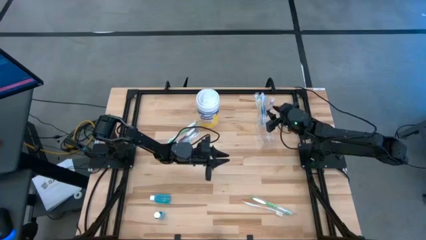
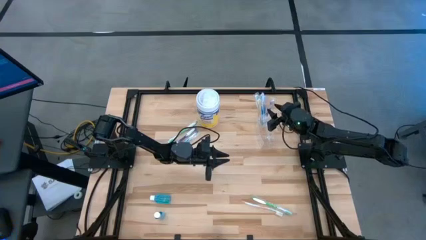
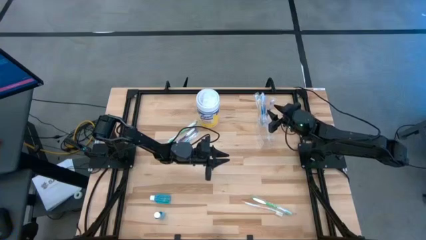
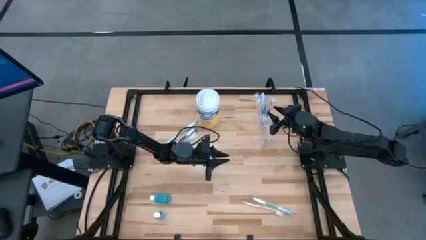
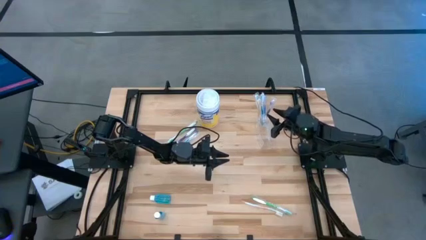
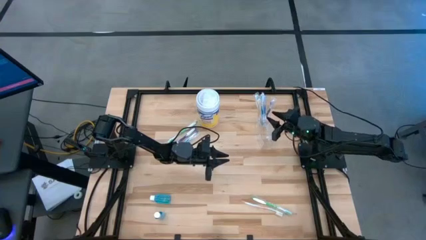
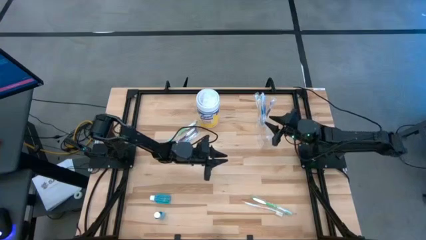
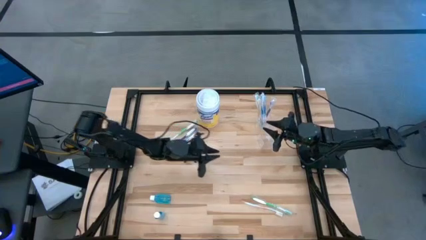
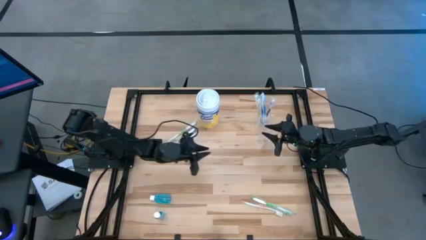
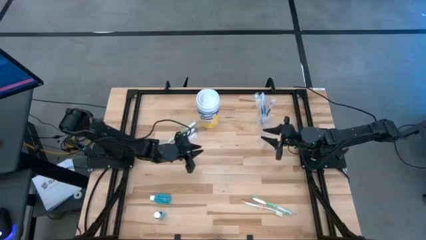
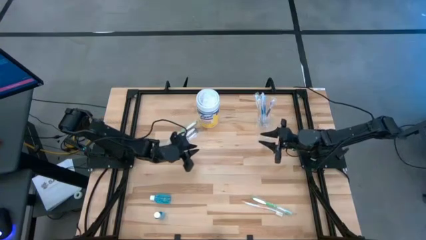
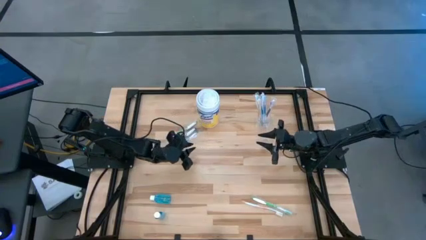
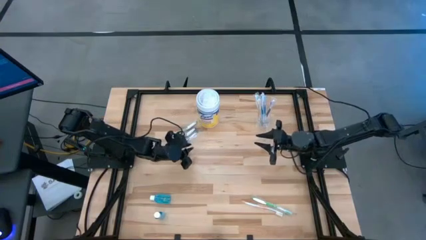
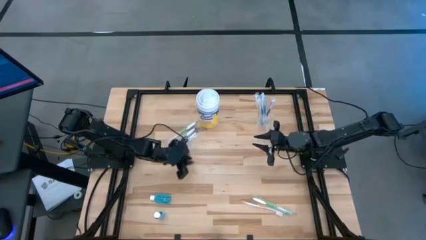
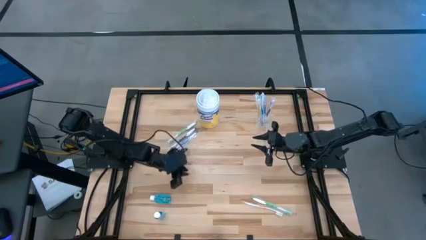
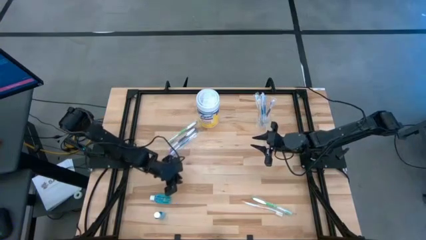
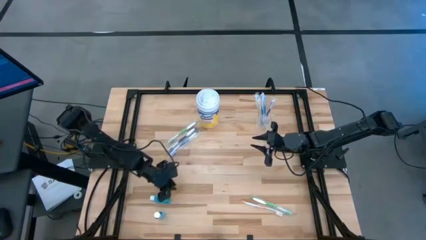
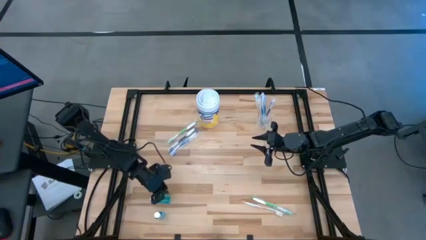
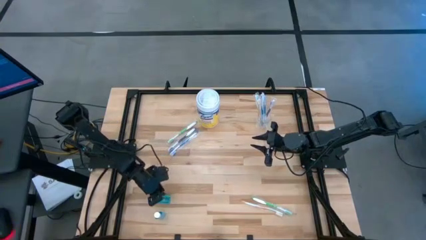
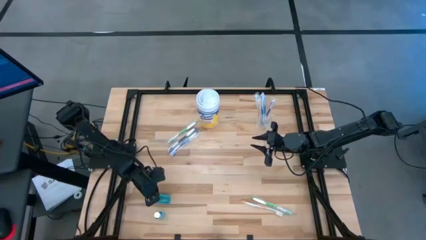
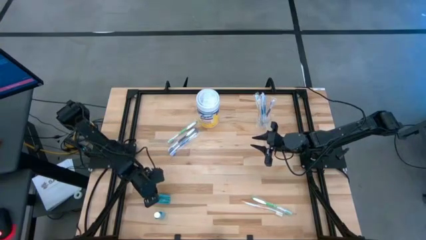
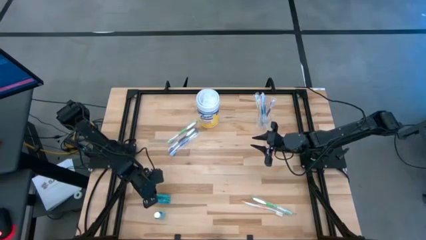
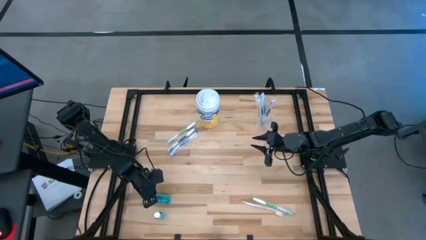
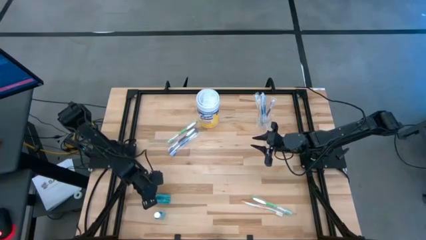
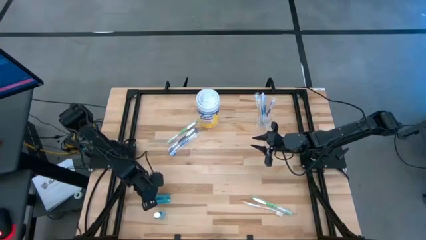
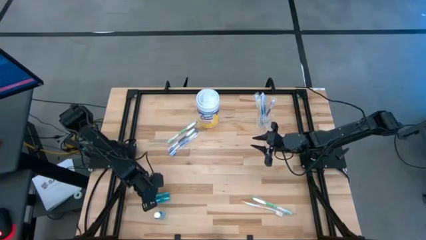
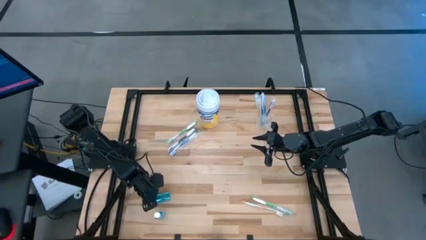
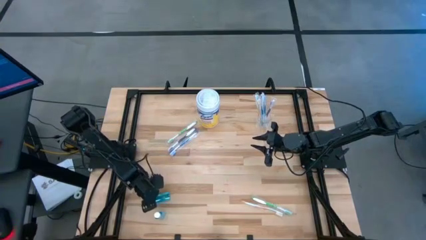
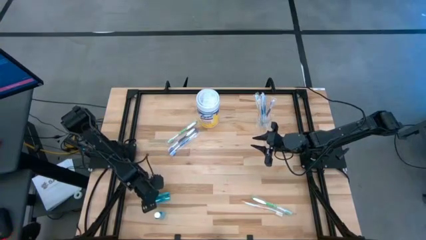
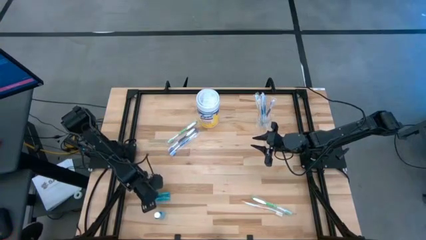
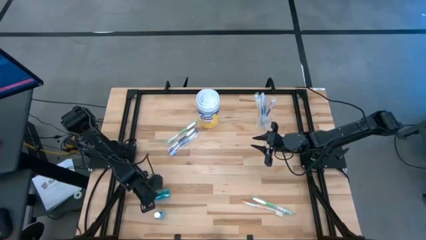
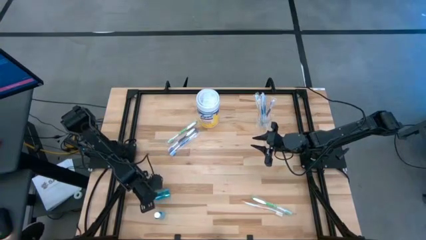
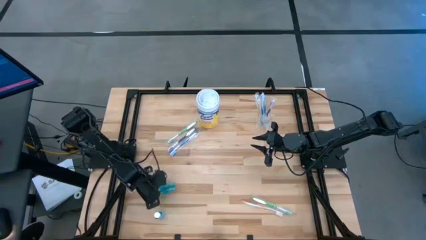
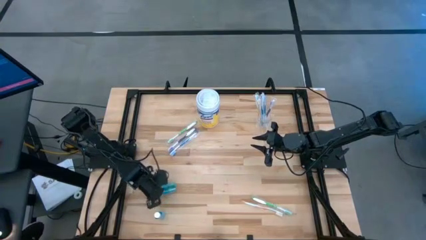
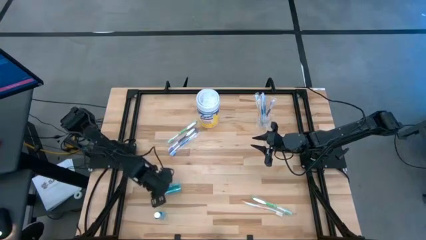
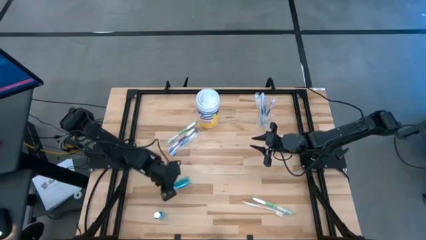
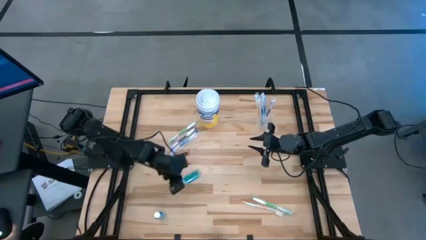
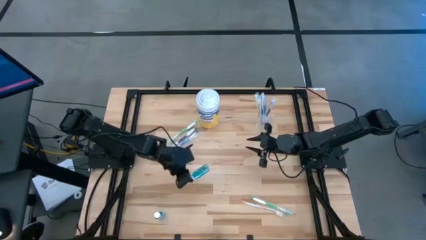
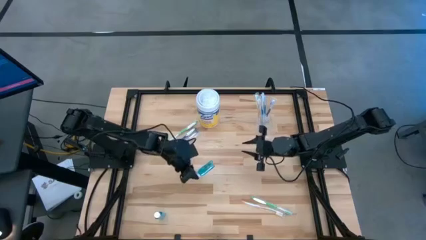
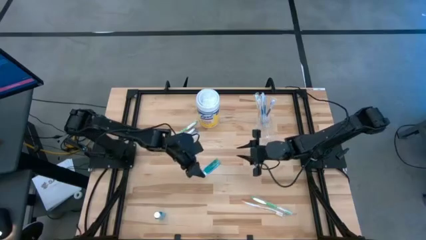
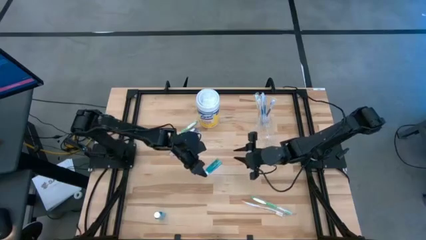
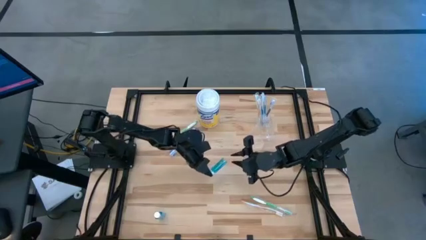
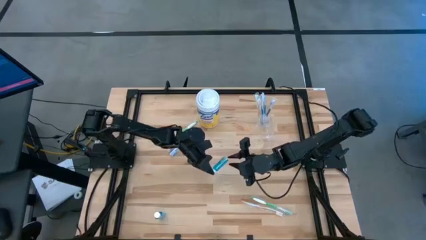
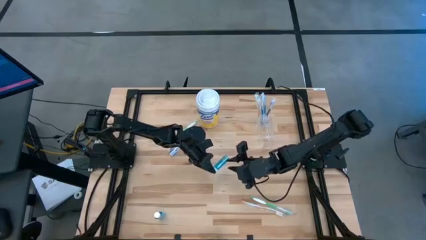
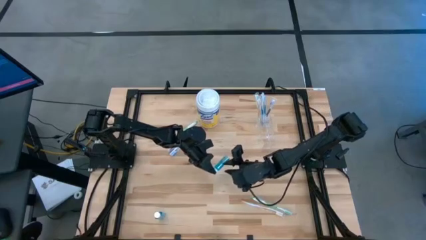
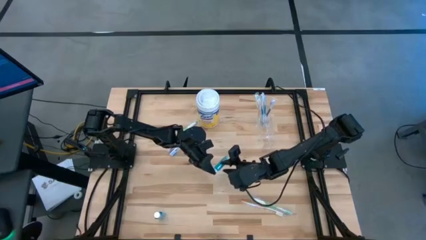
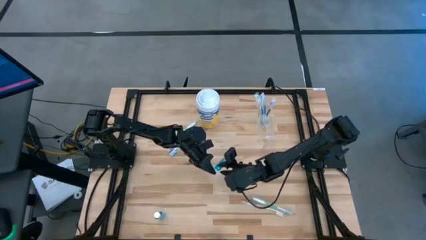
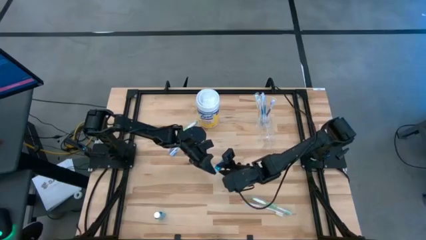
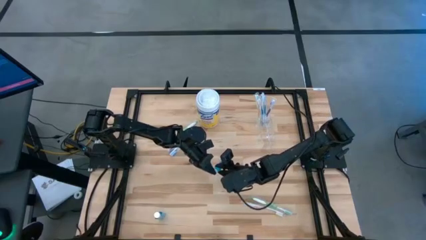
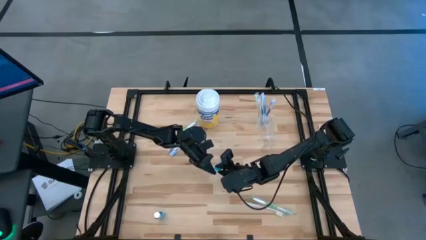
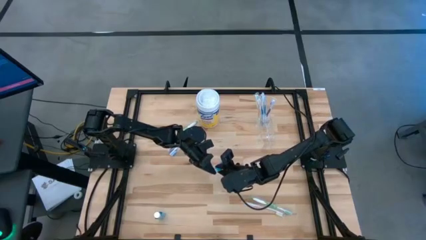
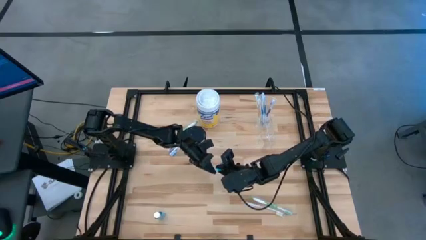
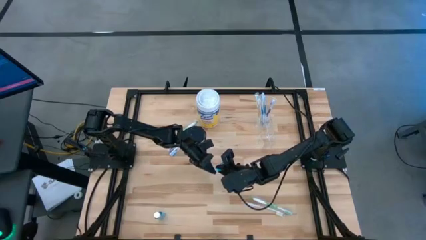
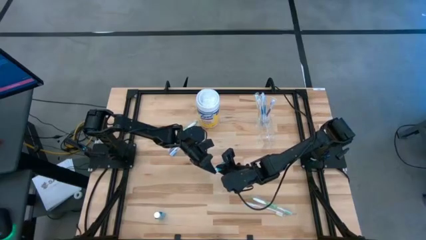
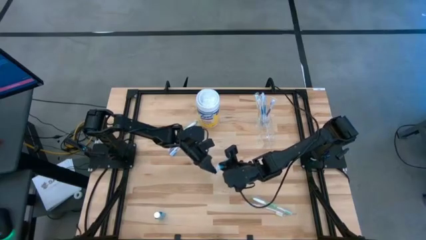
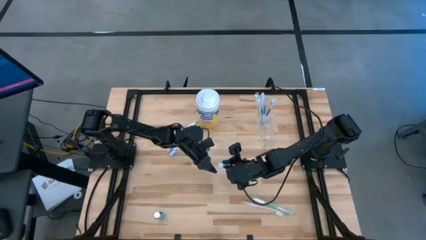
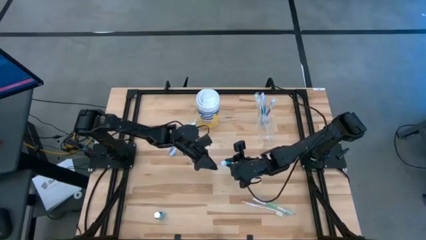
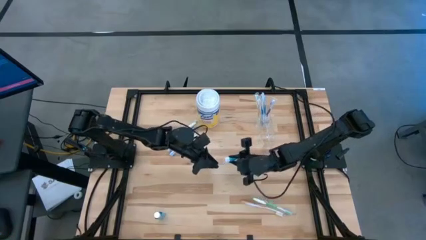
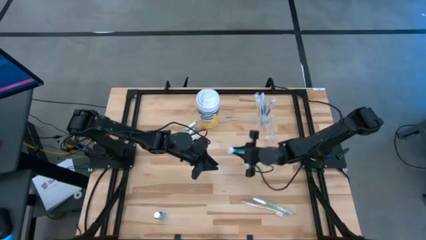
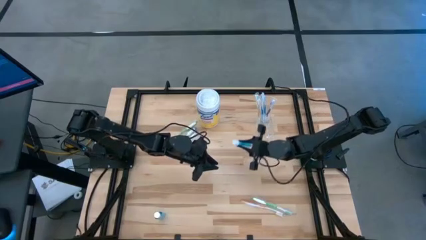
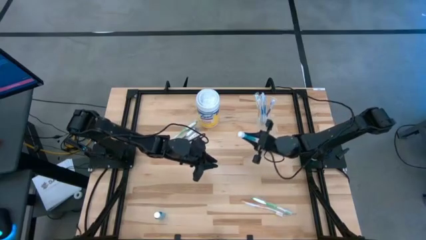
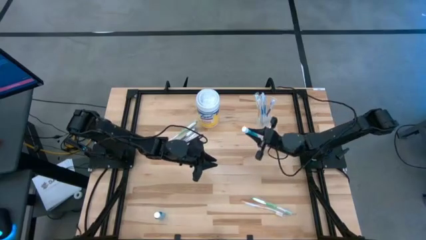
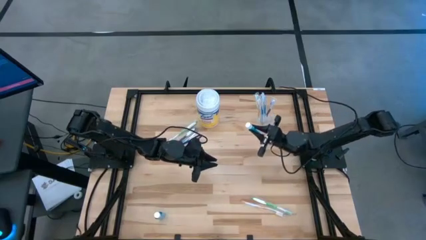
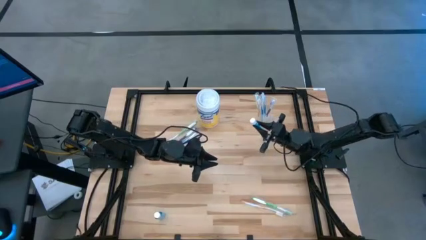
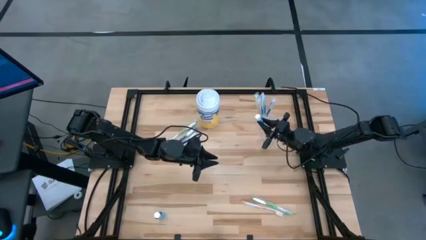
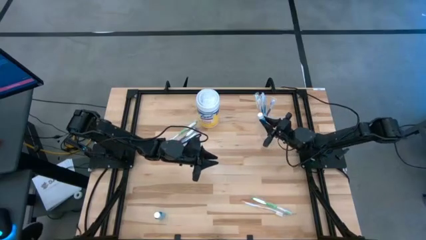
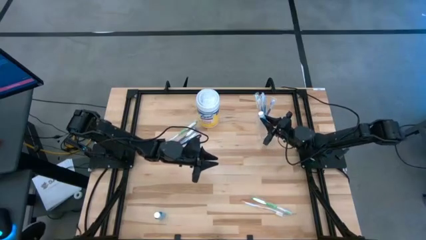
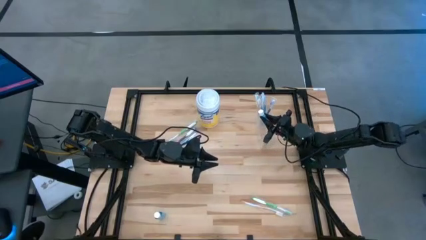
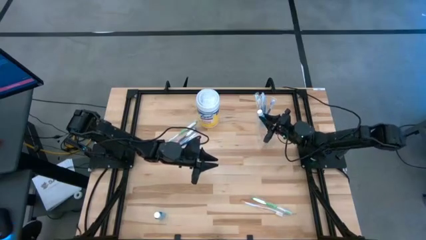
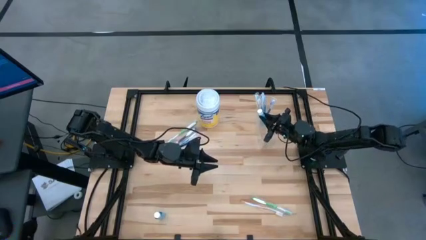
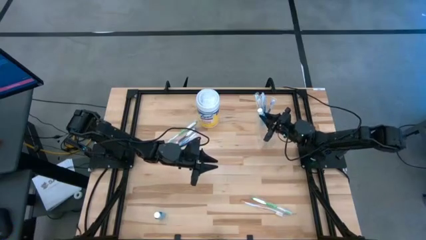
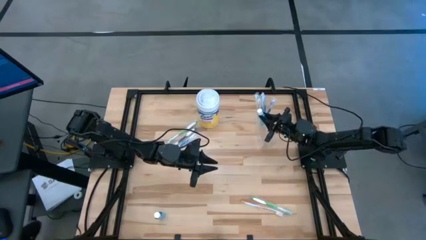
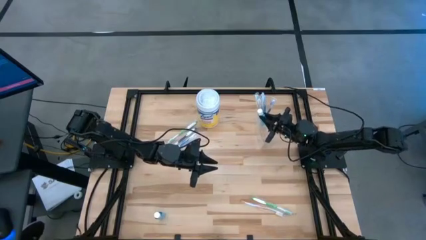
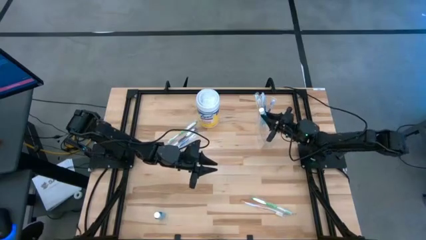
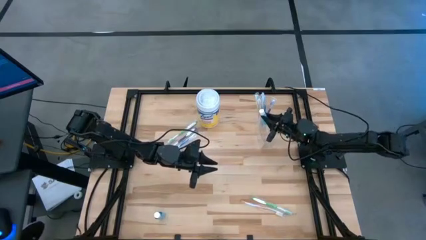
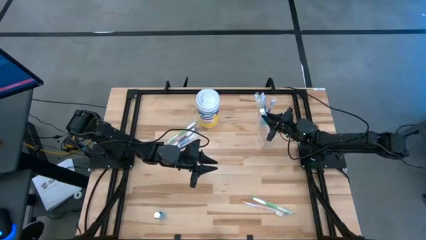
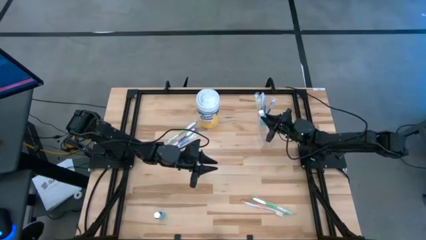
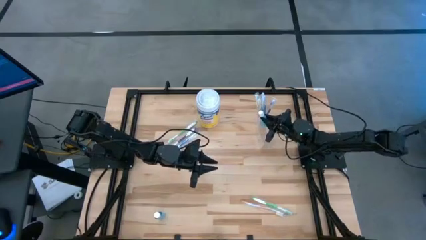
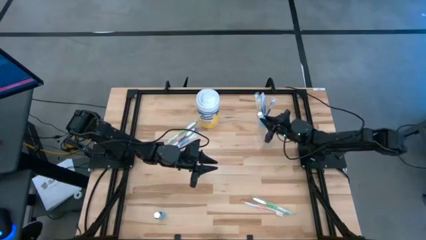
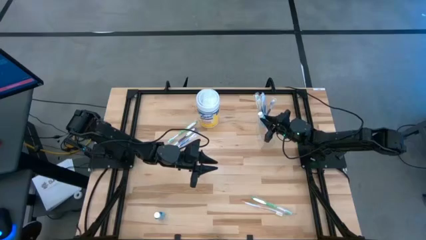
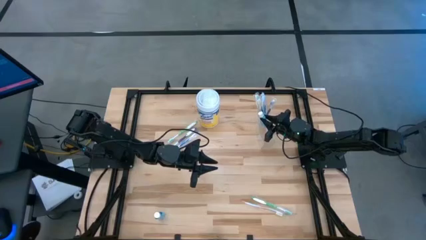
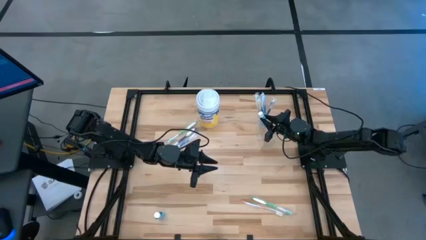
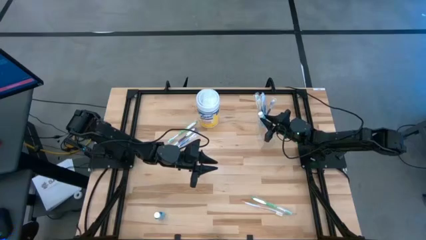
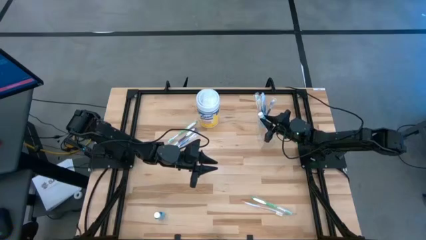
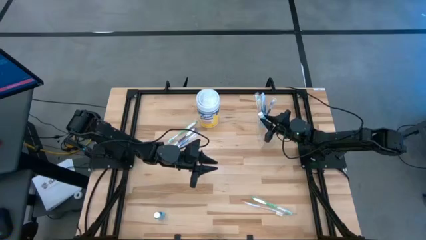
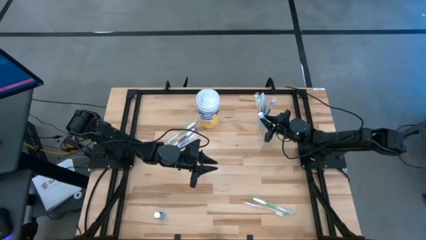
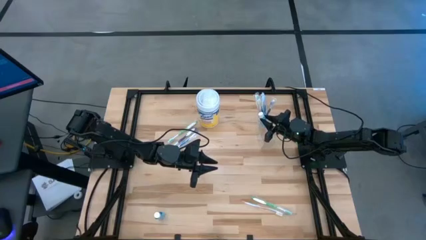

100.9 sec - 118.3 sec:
Task: Pick & Place toothbrushing station
Put the top mouthwash into the transparent organizer
